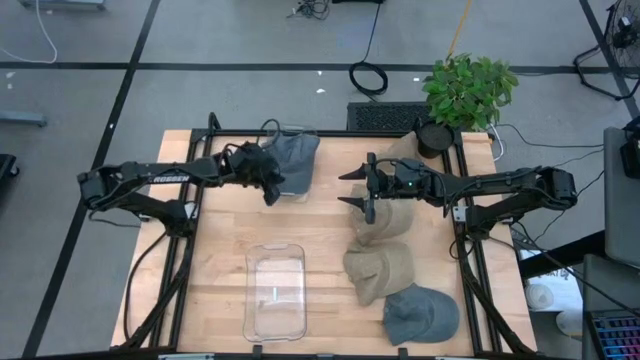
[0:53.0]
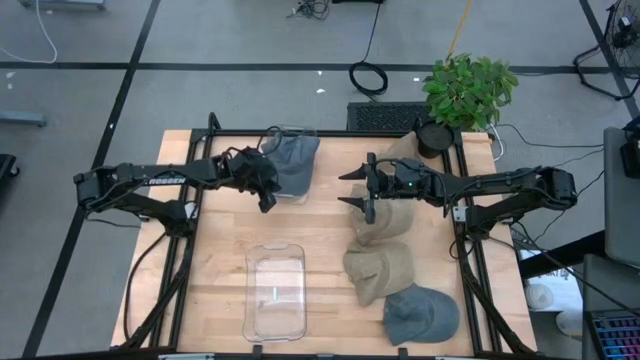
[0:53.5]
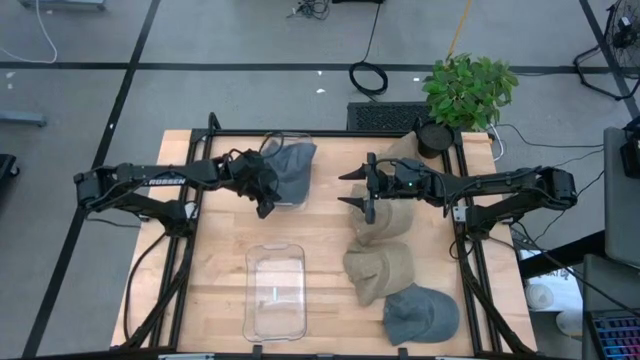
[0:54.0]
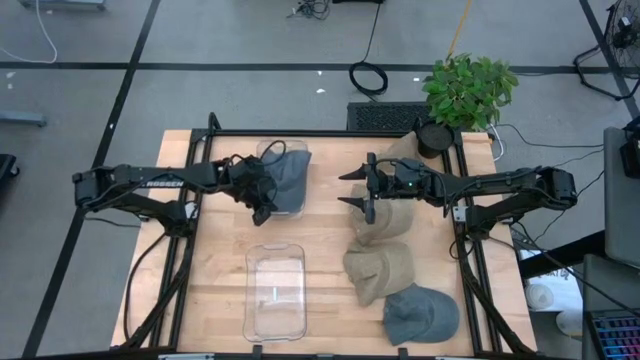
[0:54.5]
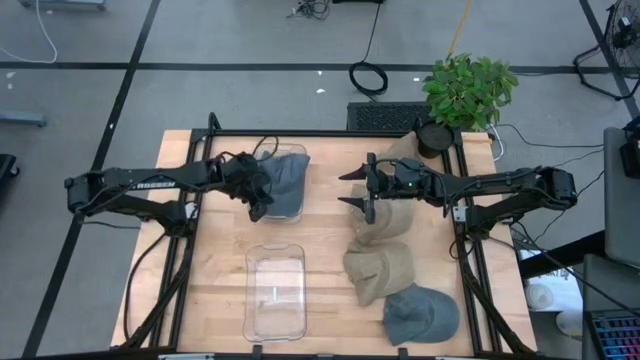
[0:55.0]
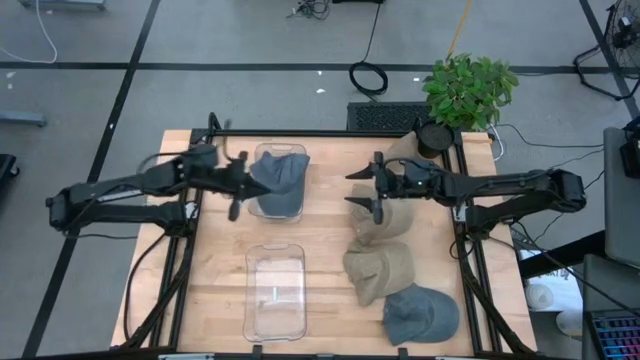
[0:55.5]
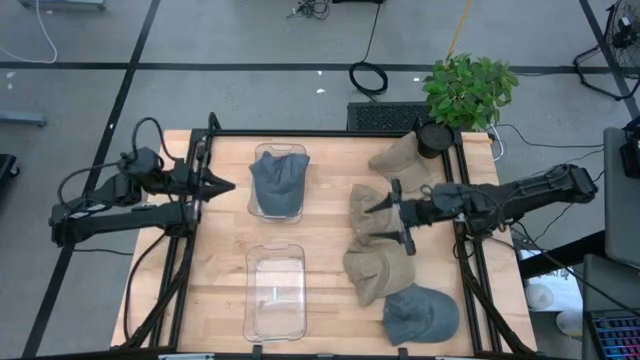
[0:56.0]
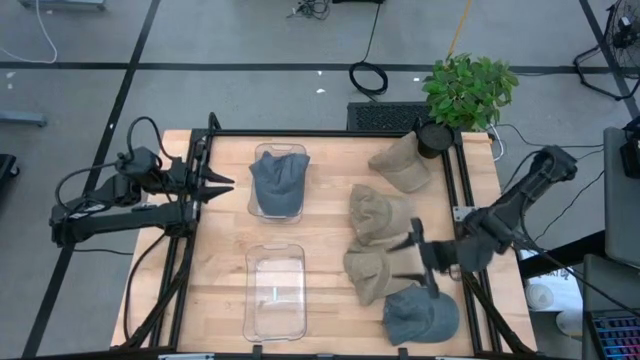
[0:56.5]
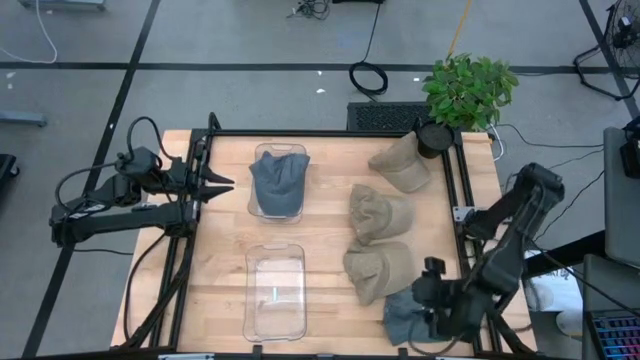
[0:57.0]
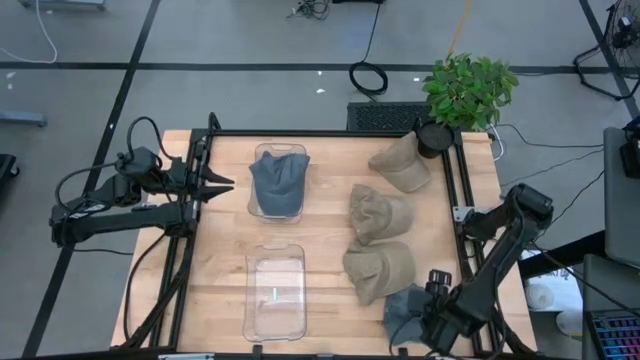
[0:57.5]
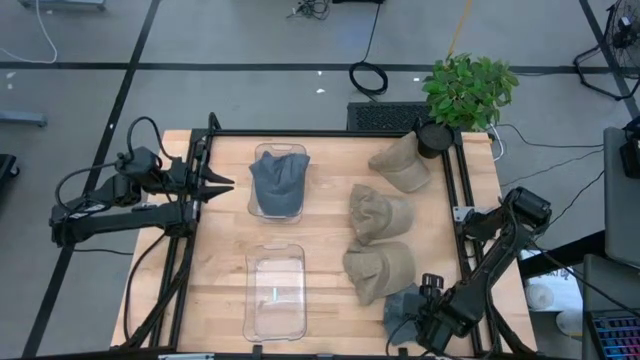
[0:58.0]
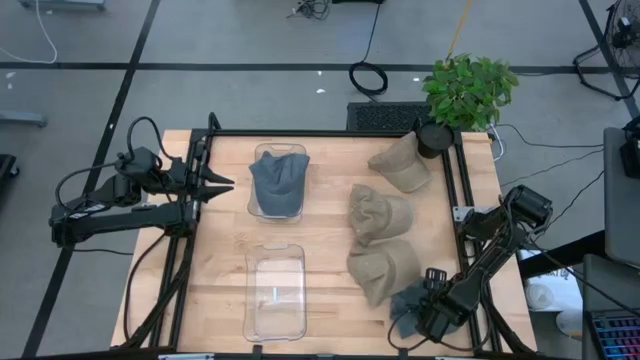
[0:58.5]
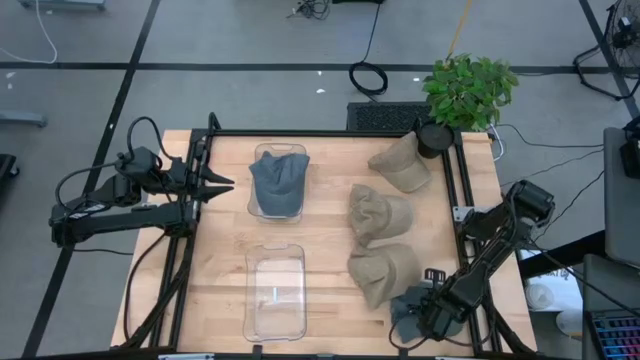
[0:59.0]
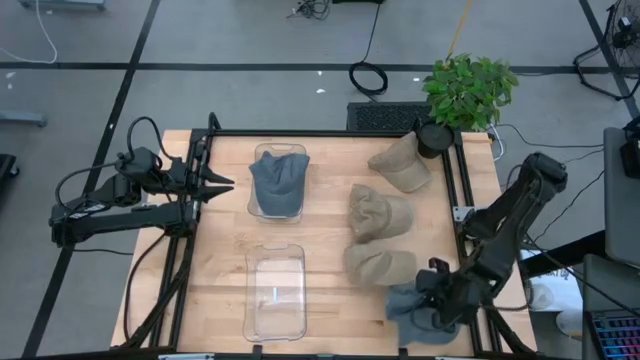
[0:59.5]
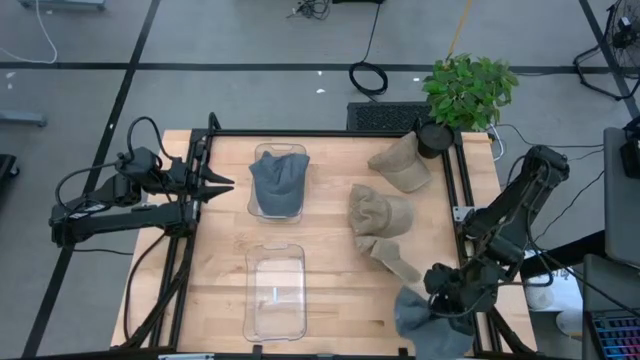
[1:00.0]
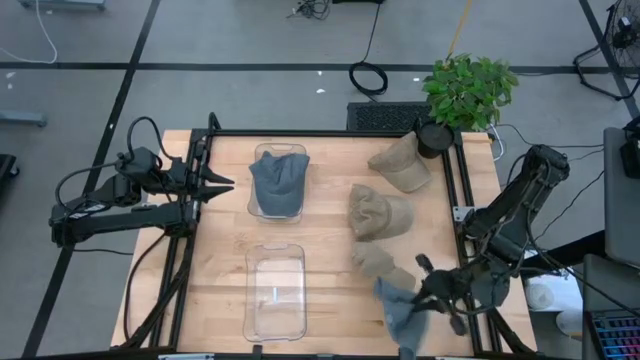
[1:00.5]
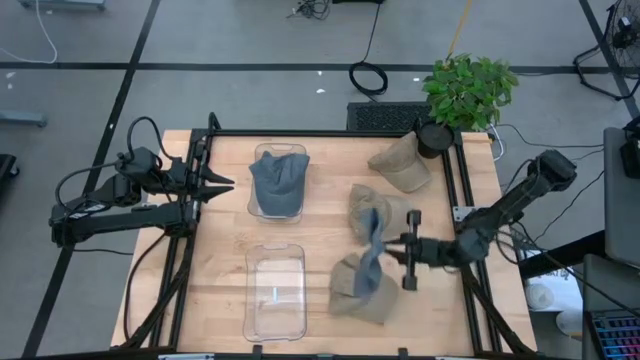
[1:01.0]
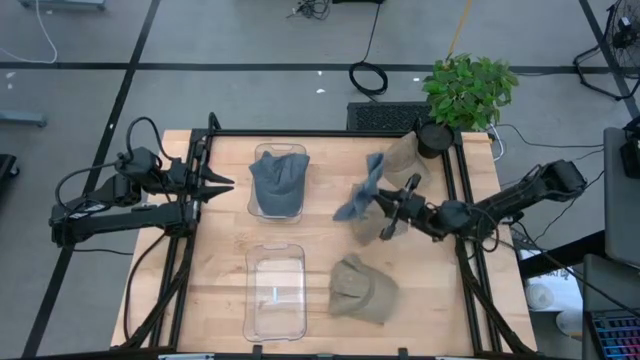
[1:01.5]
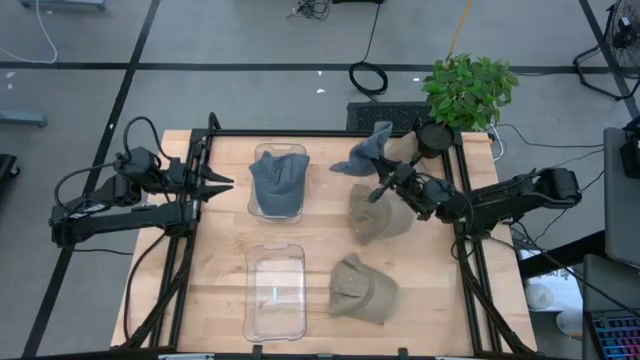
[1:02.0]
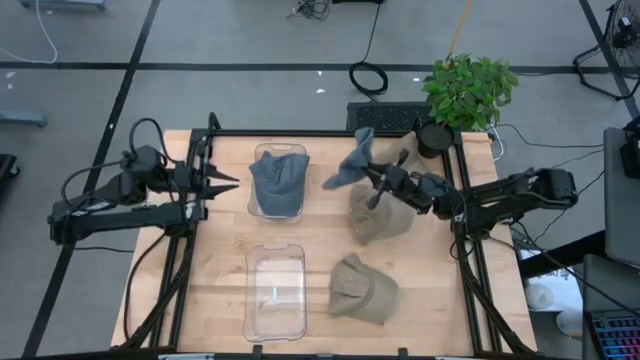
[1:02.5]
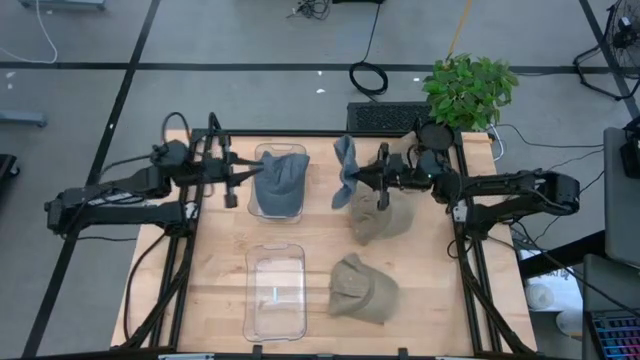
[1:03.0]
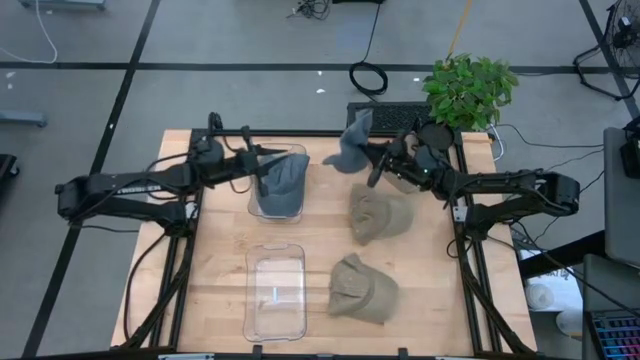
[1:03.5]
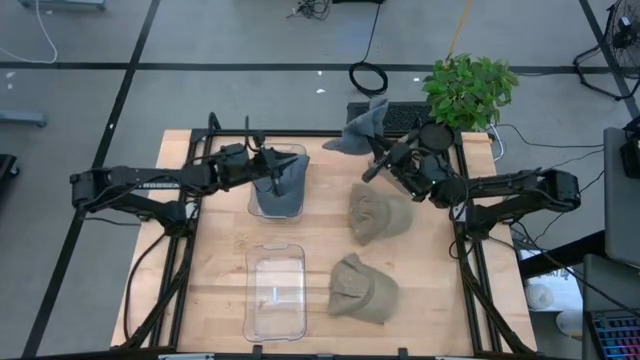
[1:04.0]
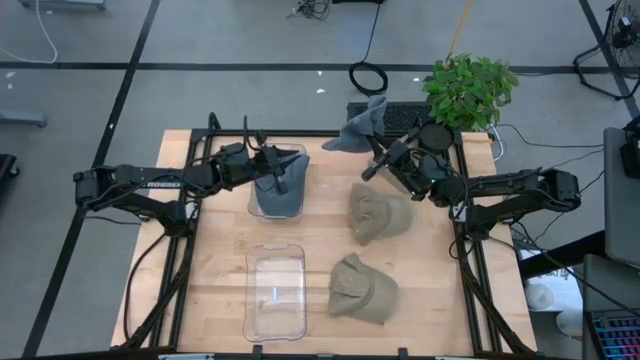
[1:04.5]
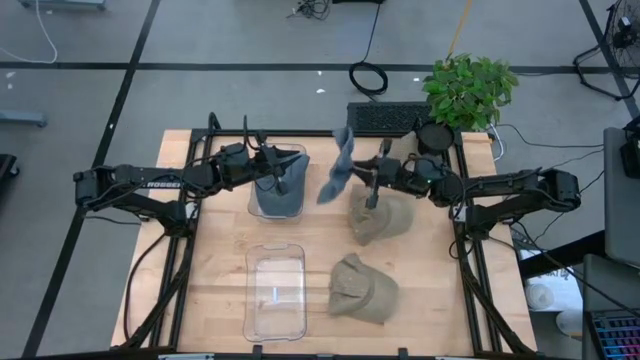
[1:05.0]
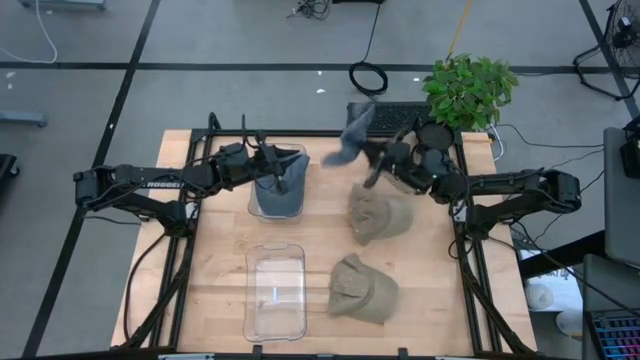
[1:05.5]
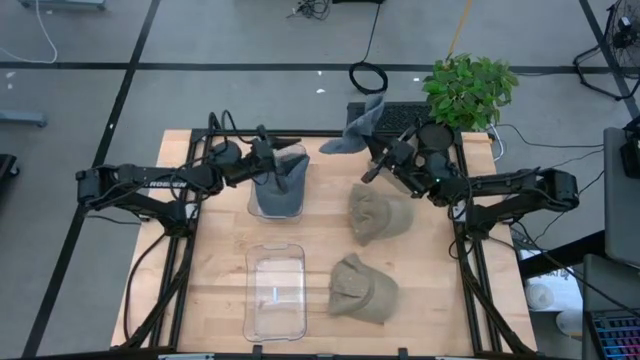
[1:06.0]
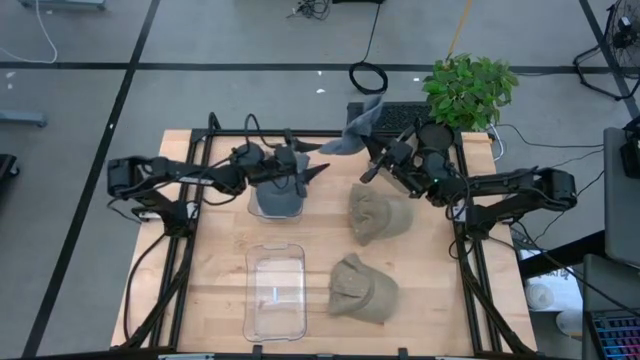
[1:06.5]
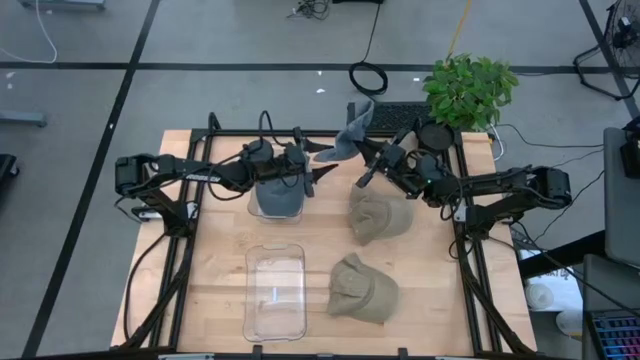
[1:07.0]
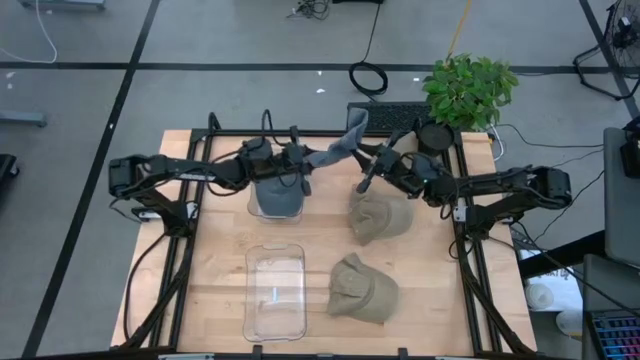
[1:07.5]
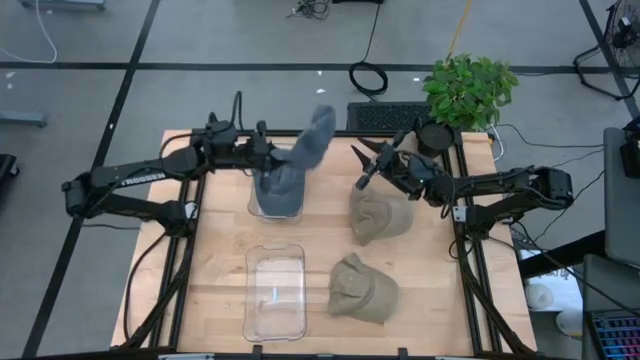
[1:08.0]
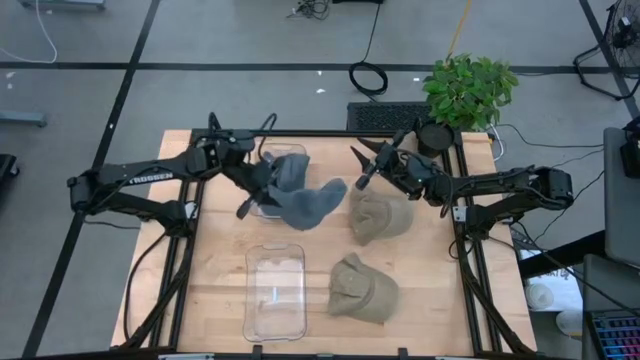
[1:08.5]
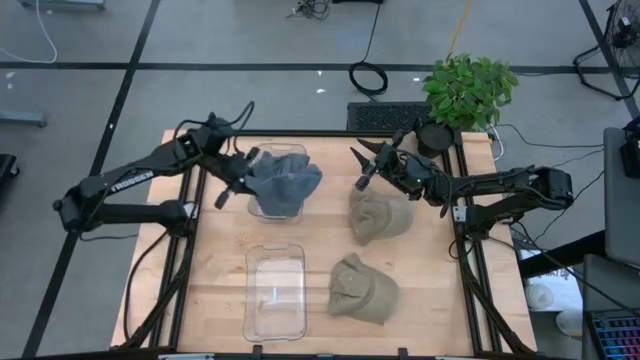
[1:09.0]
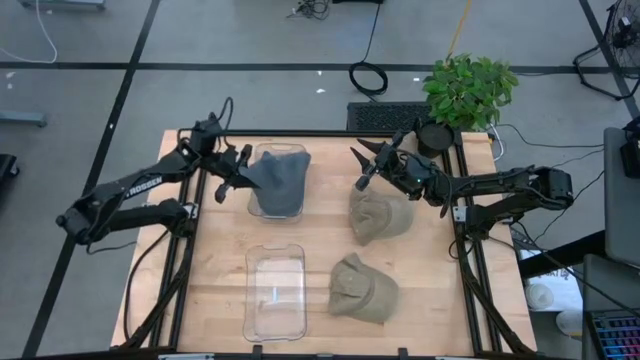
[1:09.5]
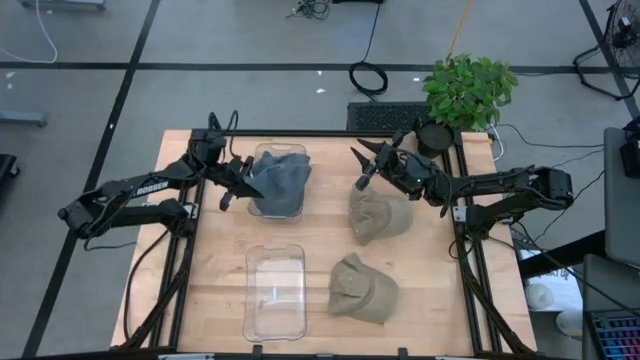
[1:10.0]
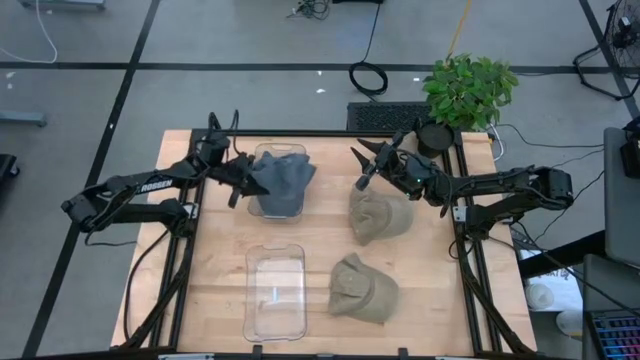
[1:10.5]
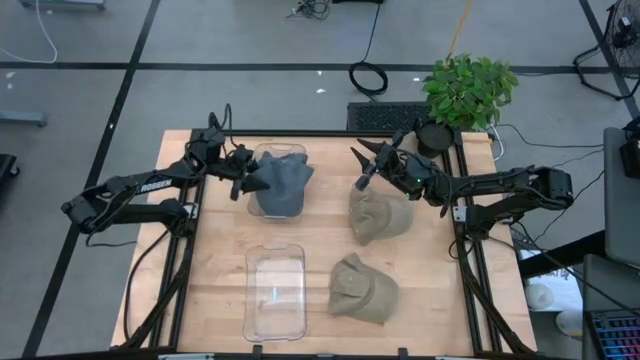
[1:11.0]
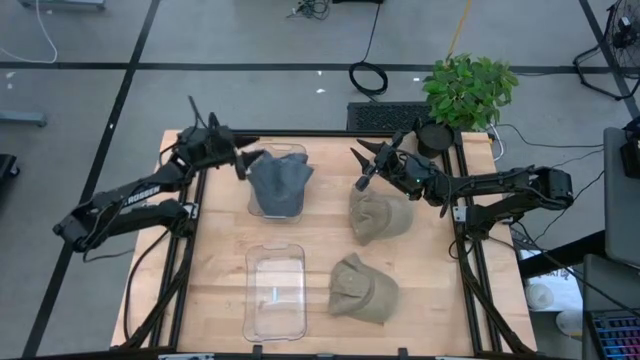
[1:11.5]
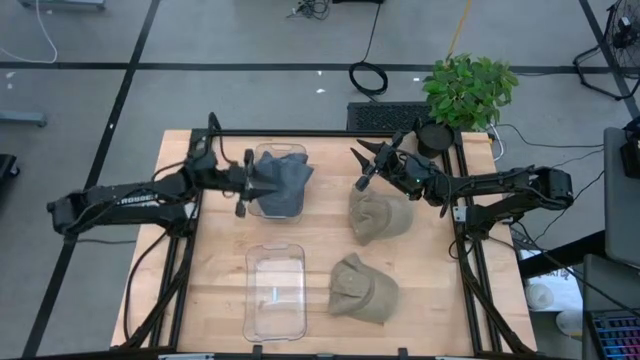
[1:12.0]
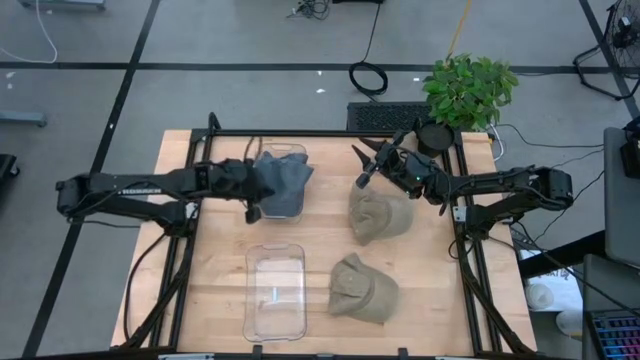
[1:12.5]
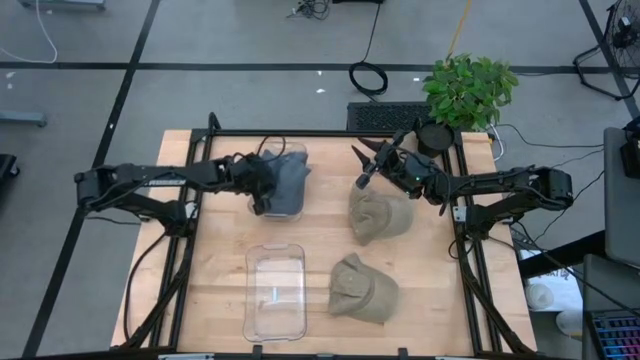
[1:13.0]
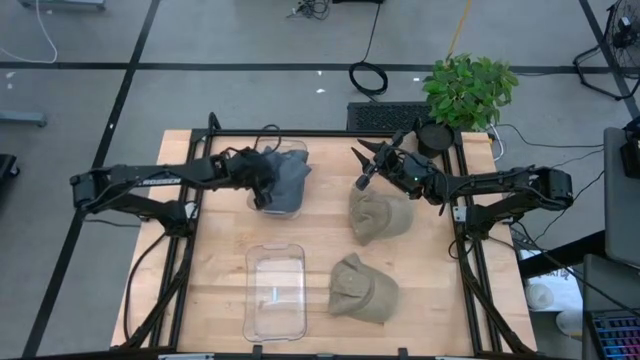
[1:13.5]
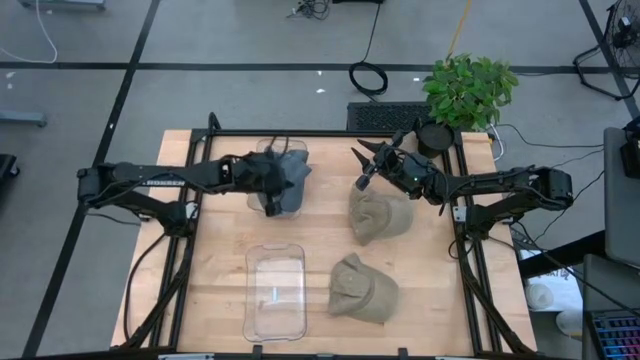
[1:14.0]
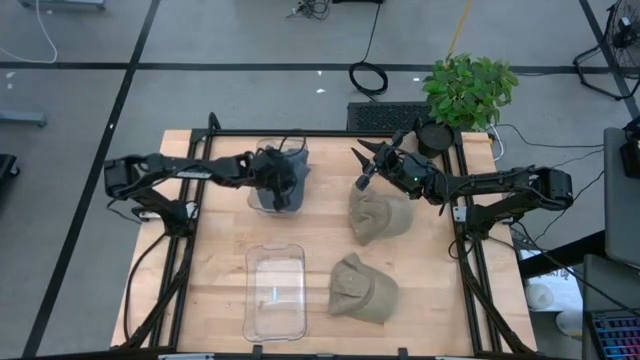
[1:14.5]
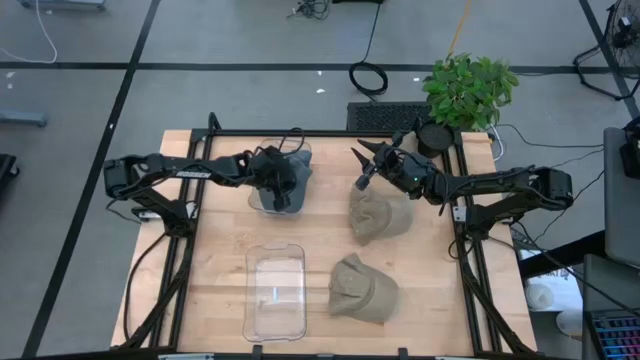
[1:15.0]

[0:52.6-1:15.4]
Task: Stack caps by color
Stack the blue cap on the stacked blue caps in the top transparent bin
